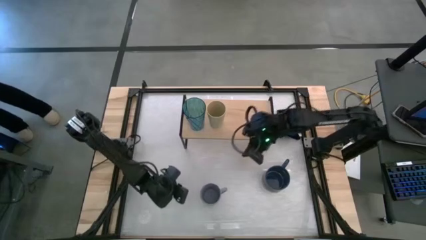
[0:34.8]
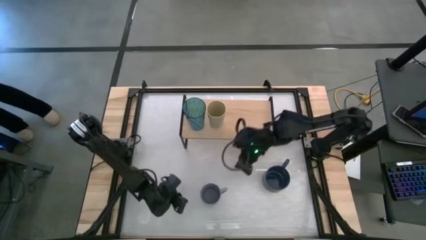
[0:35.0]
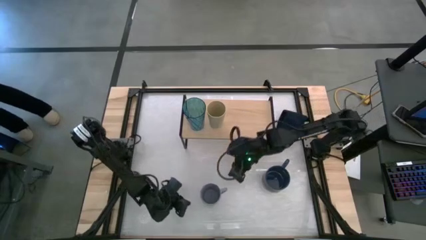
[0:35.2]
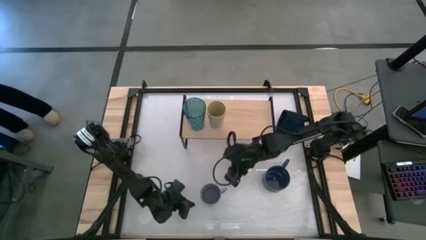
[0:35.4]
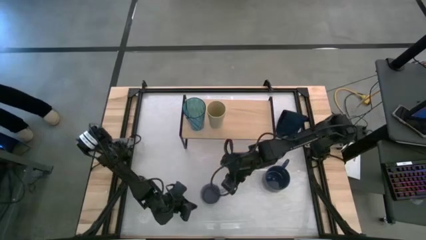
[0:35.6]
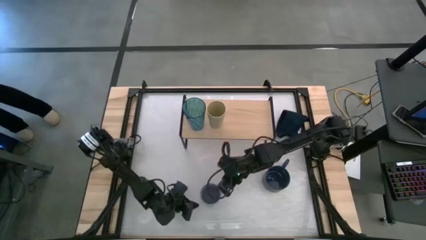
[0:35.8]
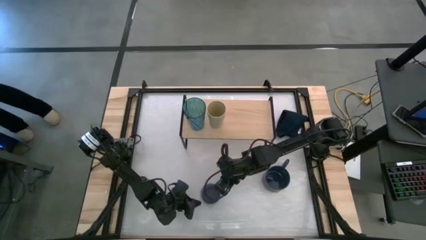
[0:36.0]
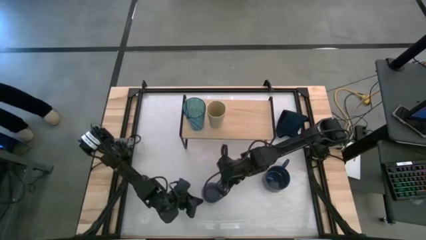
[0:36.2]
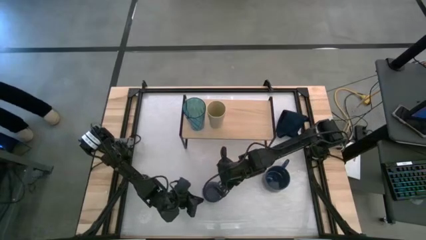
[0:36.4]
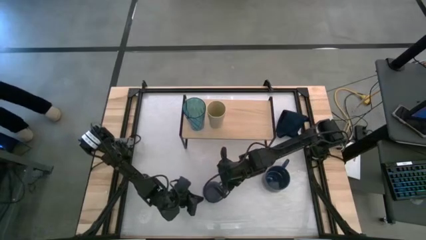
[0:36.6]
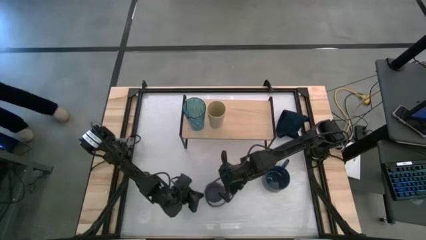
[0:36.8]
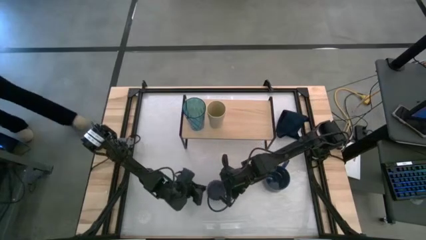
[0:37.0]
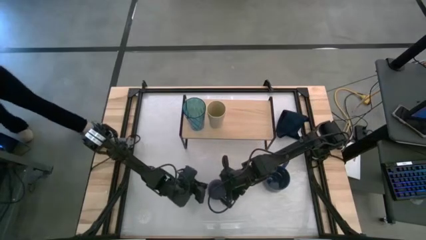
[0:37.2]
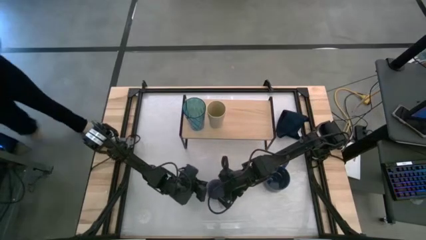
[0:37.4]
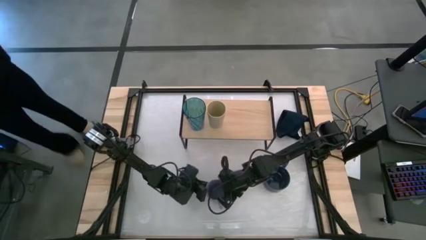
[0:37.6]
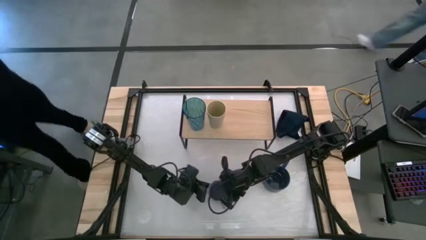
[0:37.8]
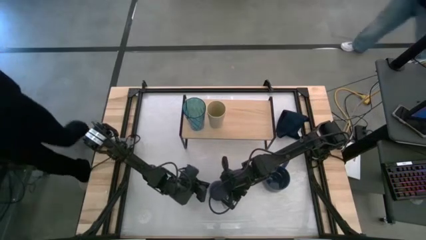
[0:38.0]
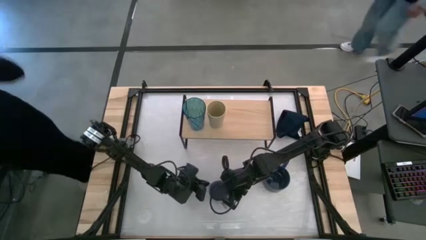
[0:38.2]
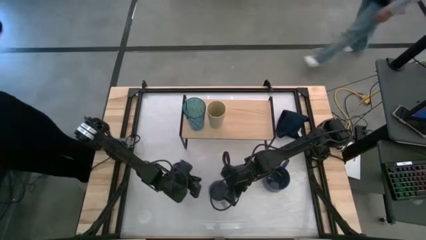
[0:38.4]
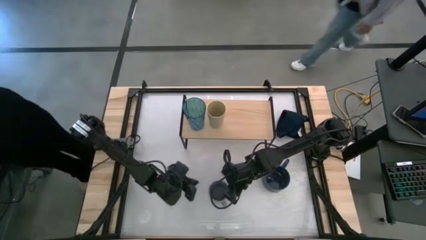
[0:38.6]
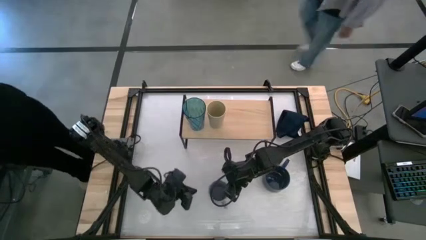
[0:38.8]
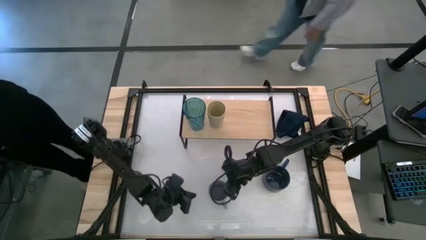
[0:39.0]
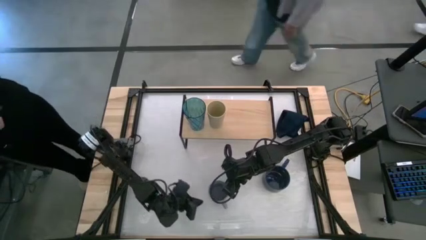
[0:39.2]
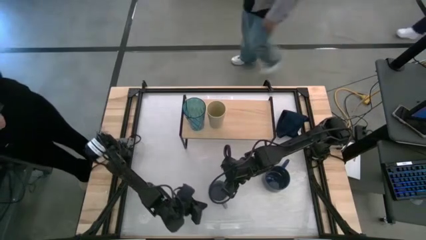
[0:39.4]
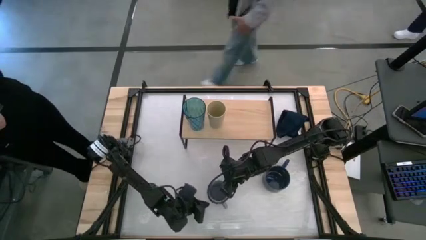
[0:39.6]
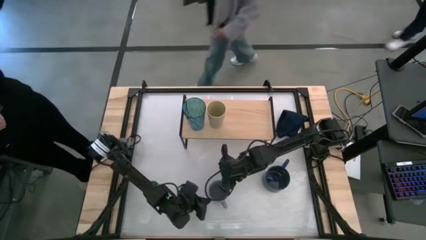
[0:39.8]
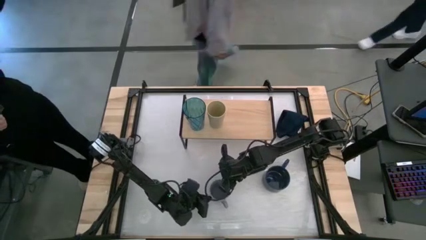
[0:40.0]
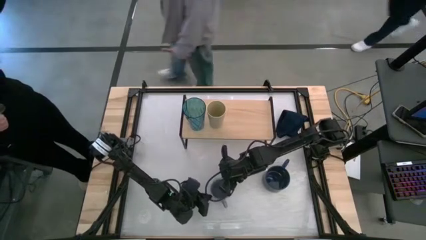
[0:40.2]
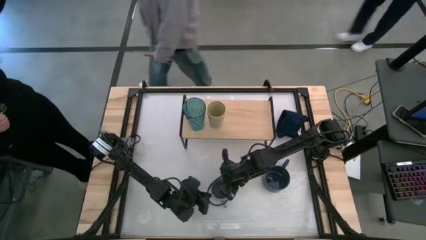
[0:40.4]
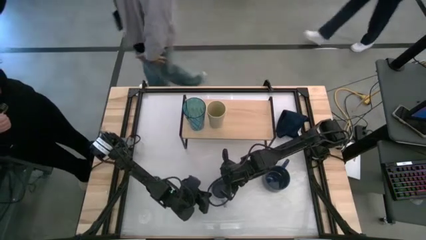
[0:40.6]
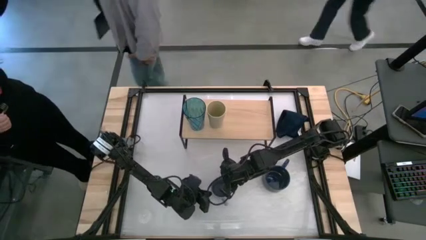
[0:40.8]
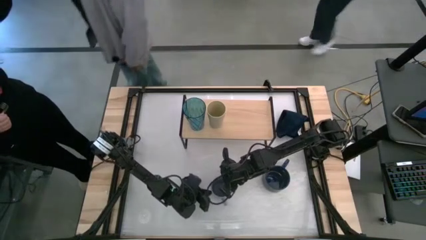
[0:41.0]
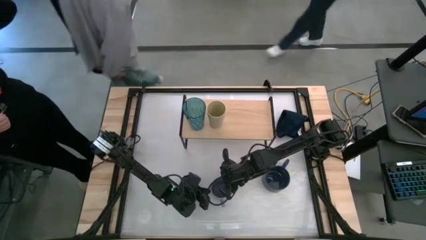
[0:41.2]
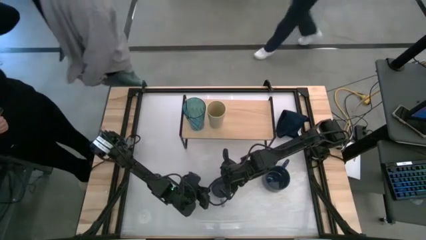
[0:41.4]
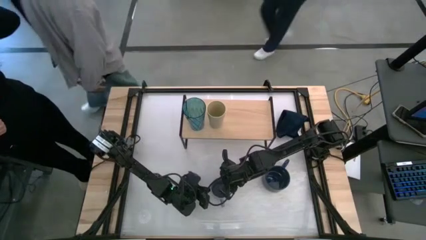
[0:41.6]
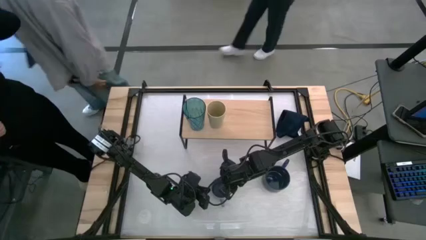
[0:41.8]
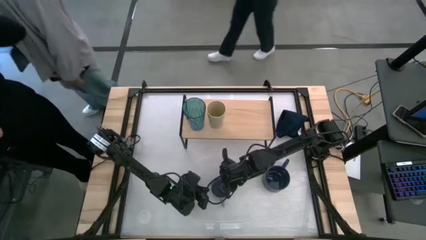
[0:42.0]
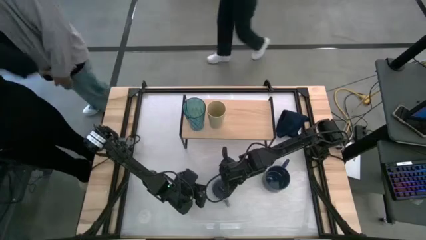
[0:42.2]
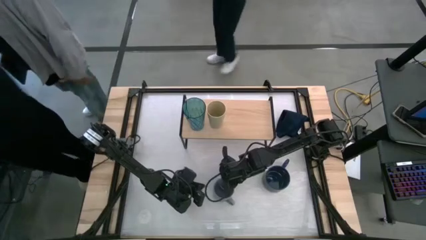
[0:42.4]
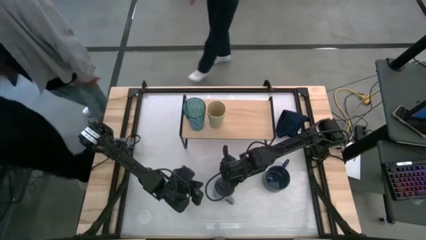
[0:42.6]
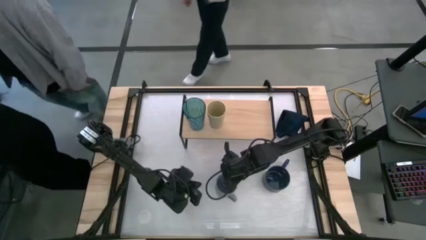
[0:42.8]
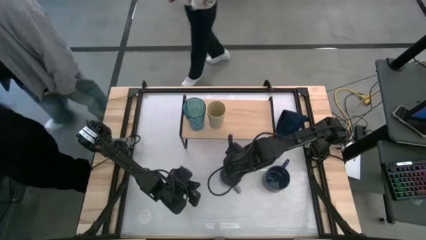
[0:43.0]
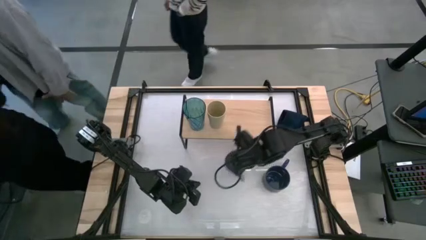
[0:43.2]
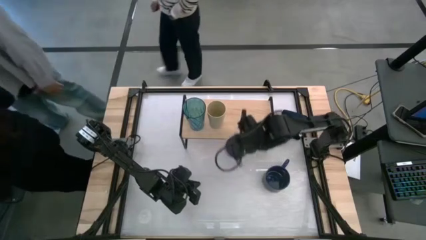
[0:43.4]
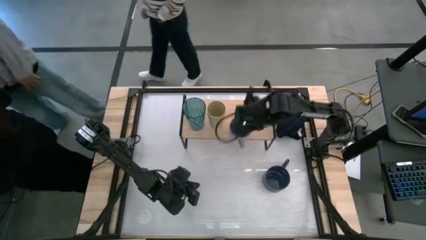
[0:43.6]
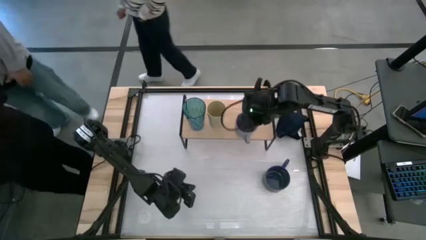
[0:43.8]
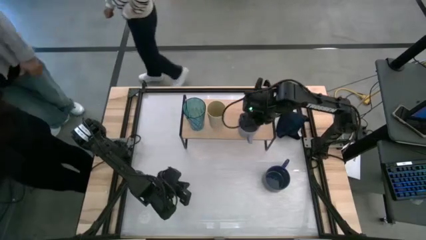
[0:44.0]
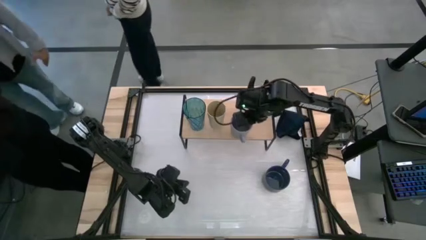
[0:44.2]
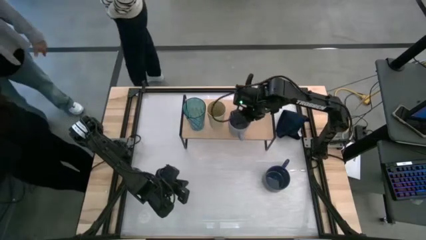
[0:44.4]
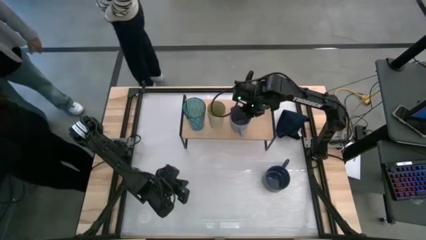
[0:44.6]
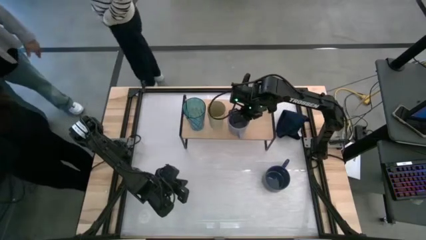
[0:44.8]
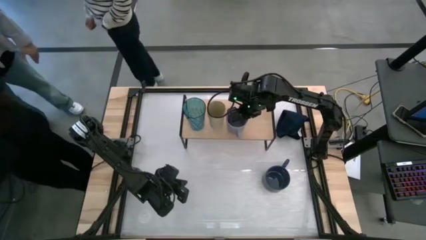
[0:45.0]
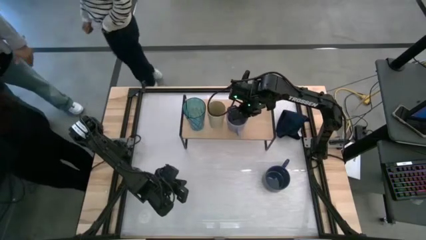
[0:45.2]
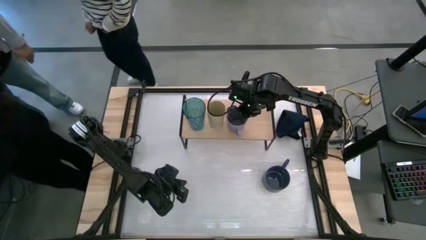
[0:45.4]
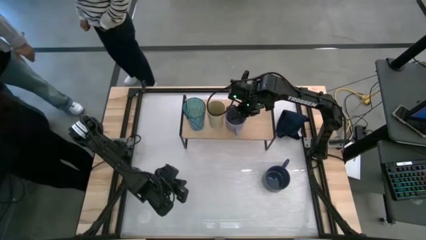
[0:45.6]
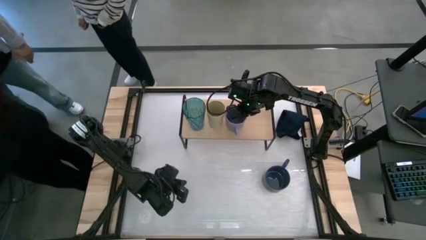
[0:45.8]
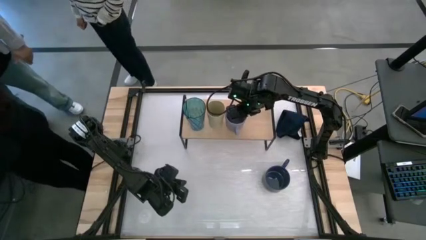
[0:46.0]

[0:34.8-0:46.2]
Task: Stack small to large cups/mugs on shelf
Put the purple mug on the shelf
